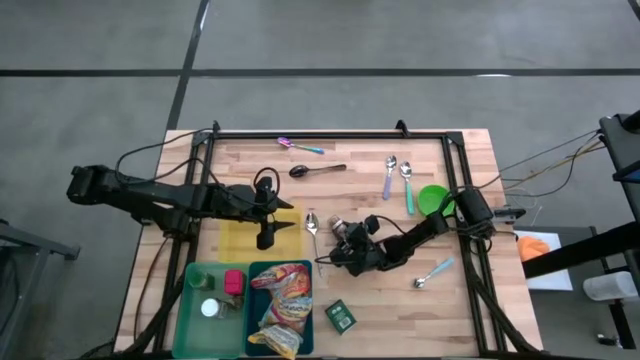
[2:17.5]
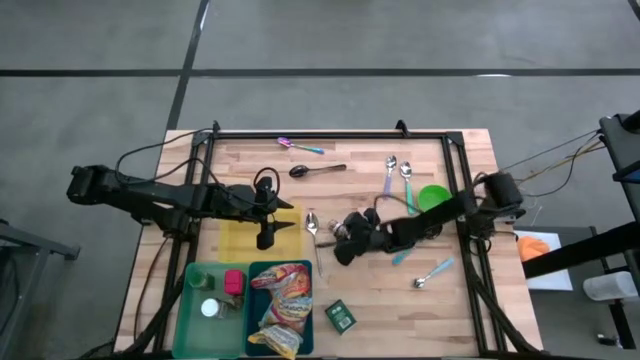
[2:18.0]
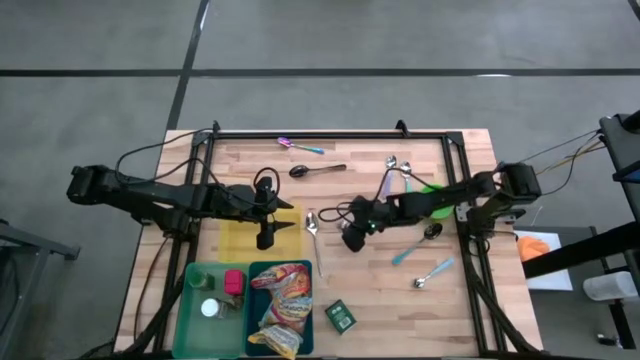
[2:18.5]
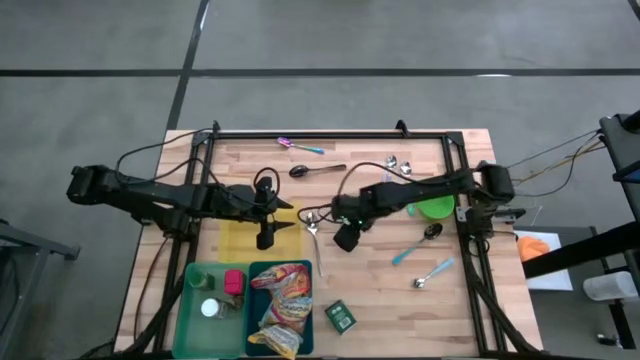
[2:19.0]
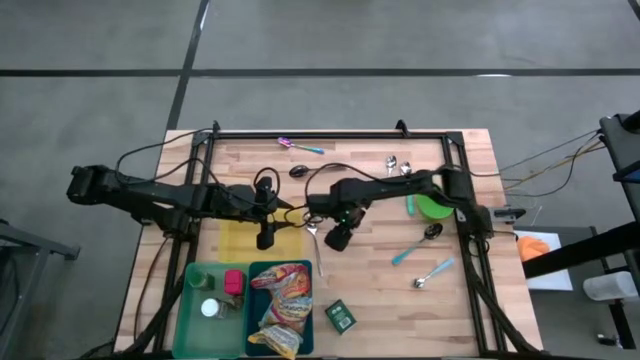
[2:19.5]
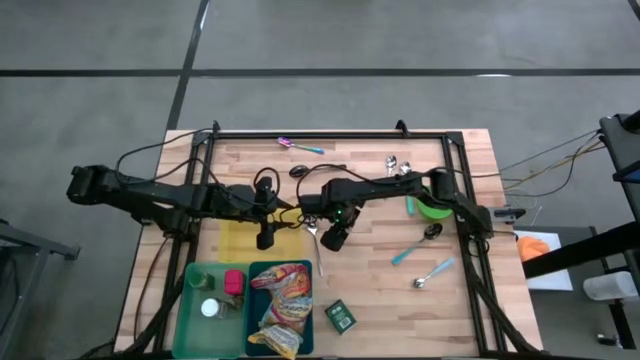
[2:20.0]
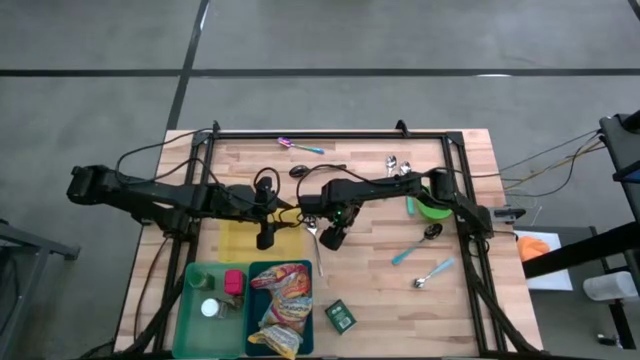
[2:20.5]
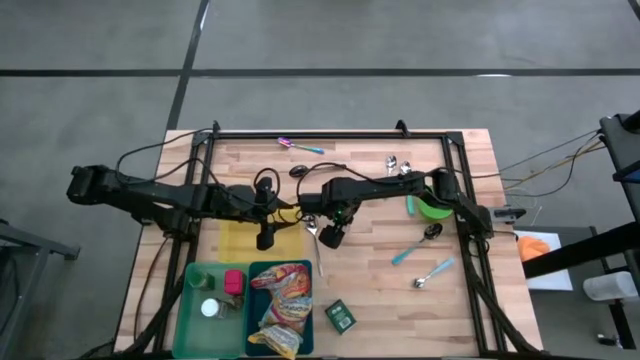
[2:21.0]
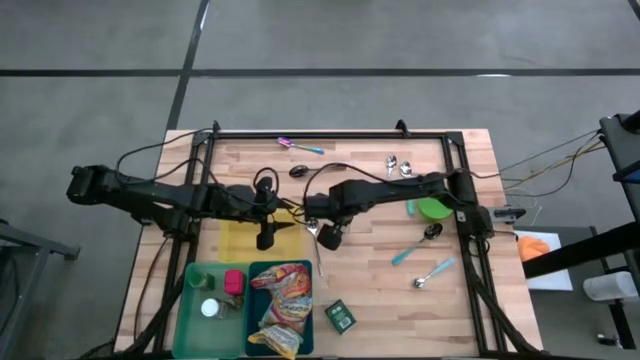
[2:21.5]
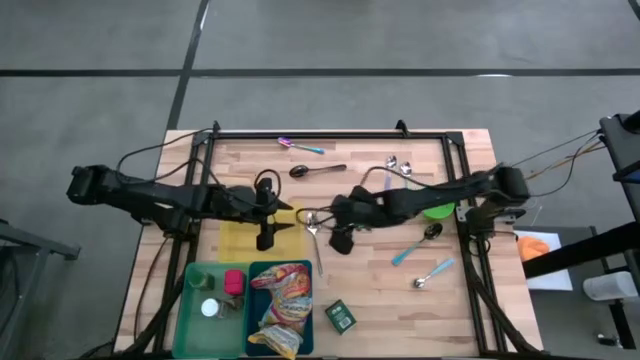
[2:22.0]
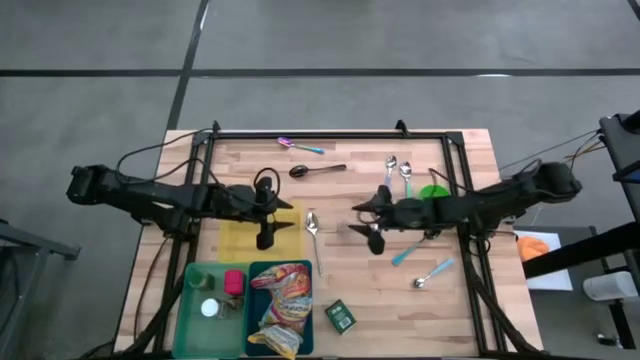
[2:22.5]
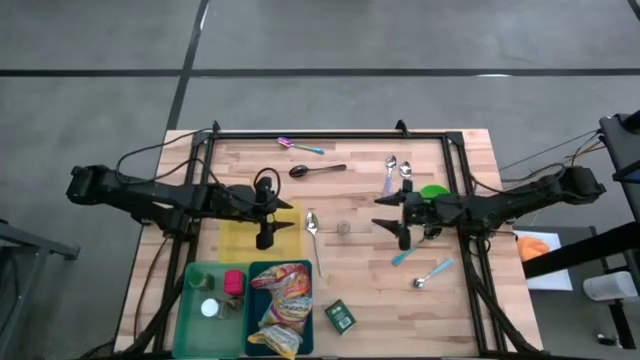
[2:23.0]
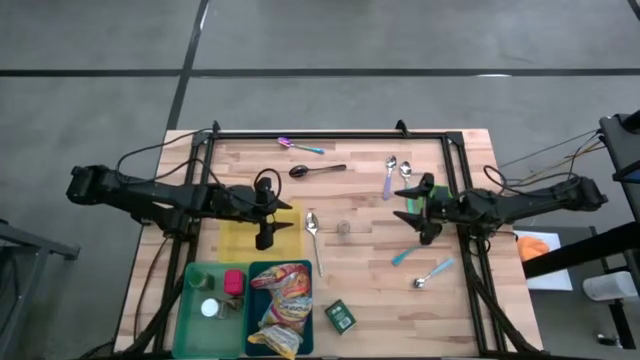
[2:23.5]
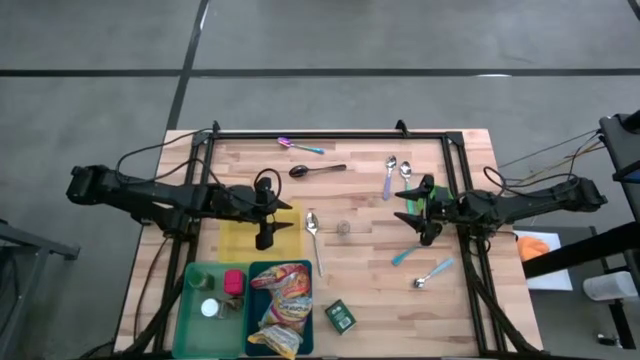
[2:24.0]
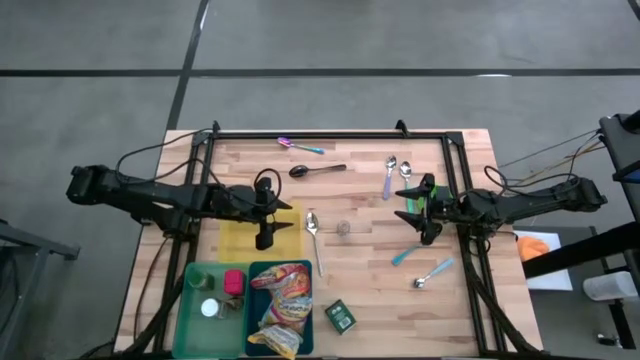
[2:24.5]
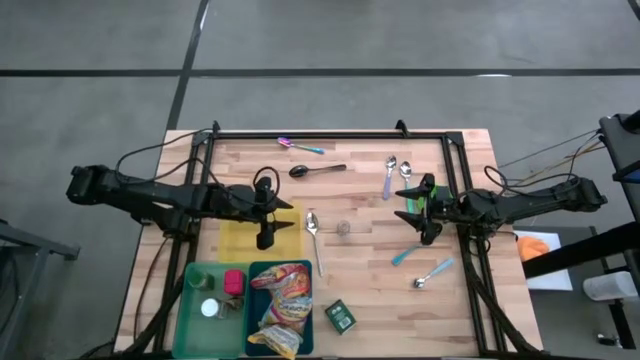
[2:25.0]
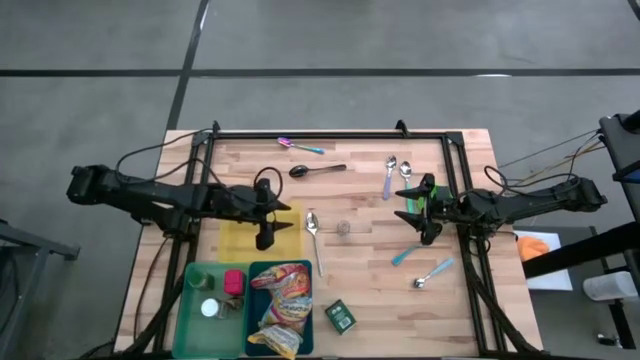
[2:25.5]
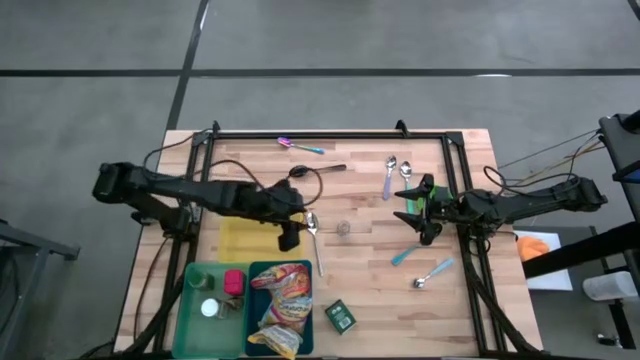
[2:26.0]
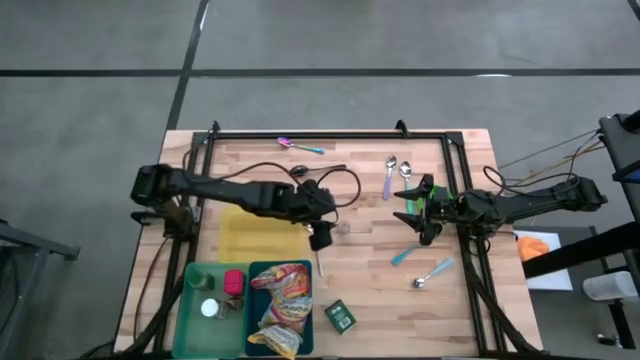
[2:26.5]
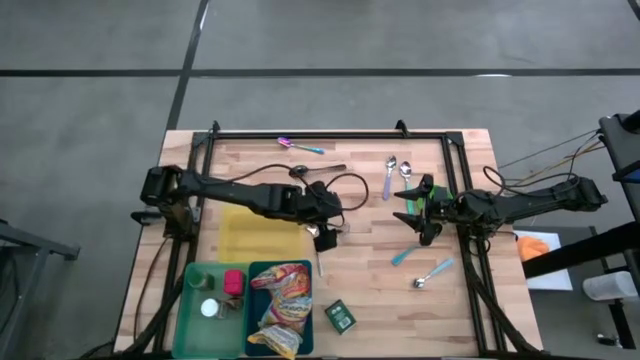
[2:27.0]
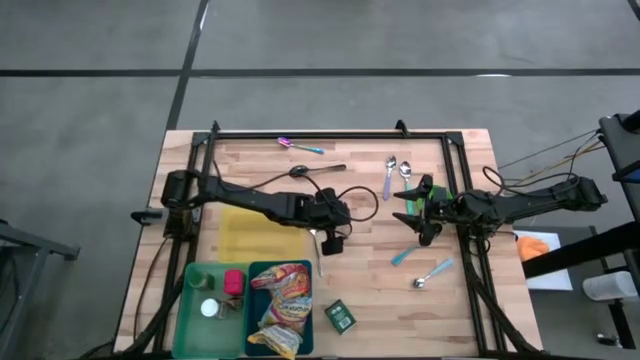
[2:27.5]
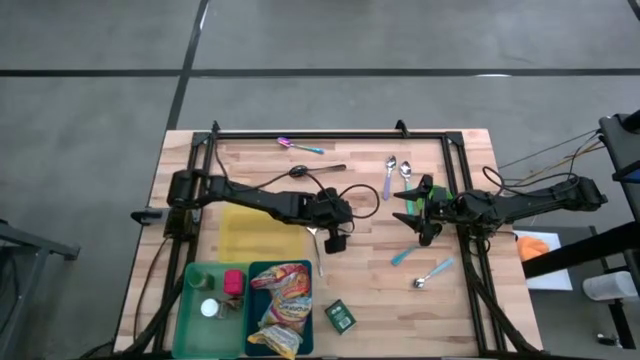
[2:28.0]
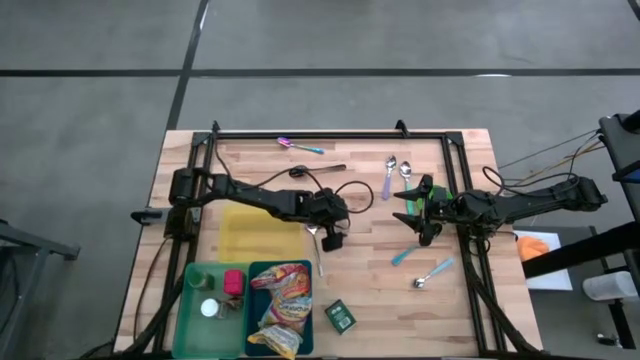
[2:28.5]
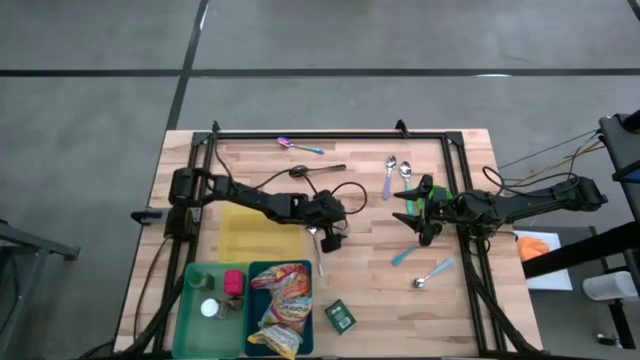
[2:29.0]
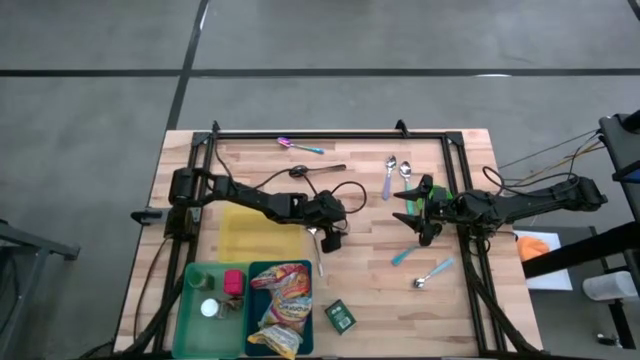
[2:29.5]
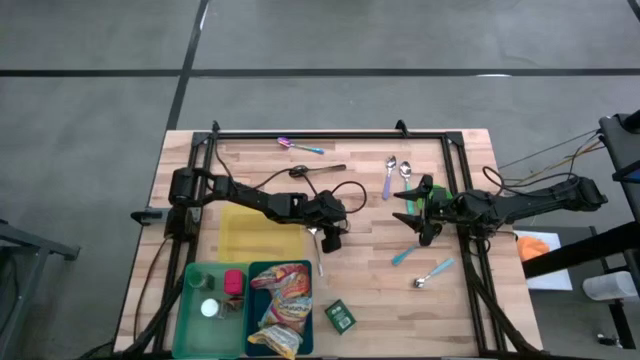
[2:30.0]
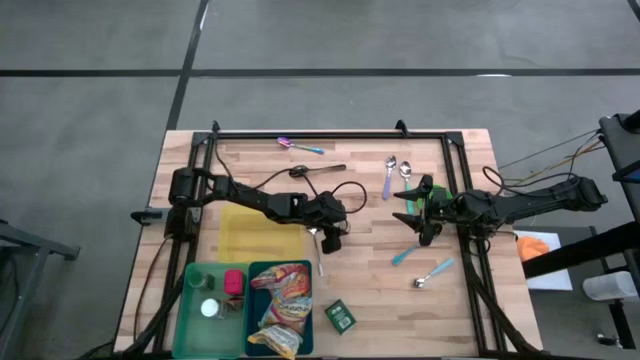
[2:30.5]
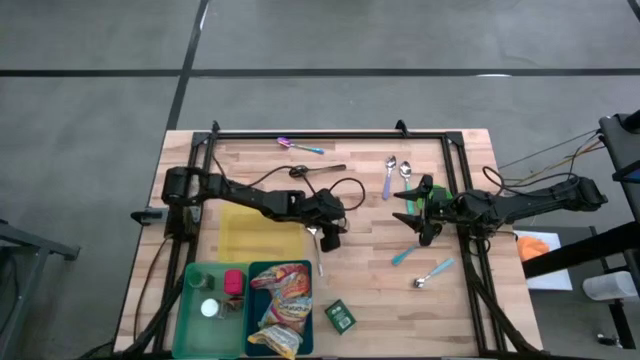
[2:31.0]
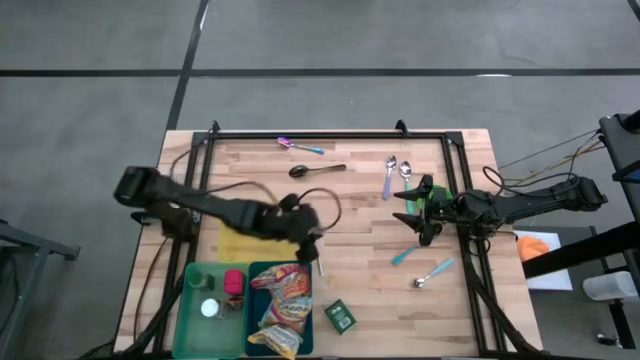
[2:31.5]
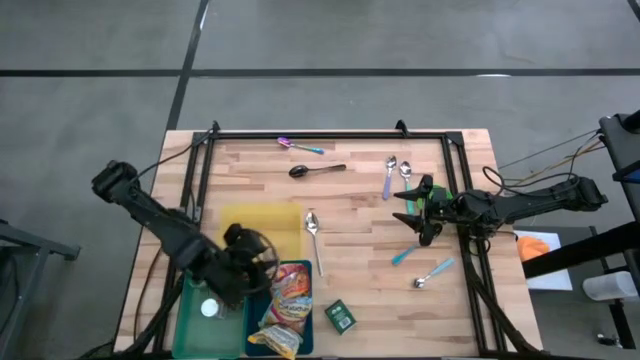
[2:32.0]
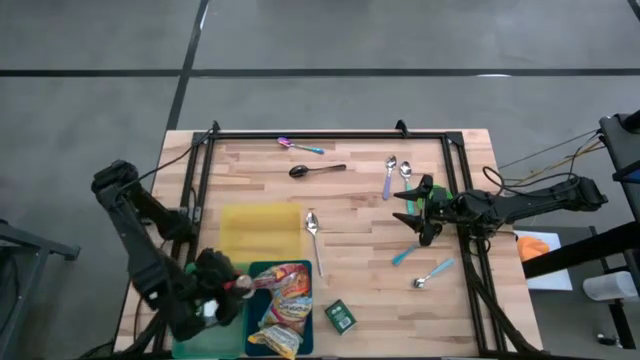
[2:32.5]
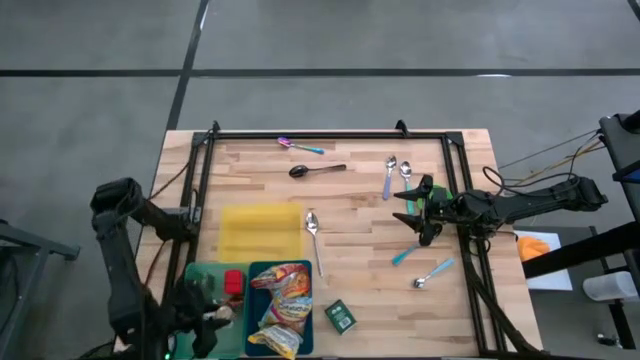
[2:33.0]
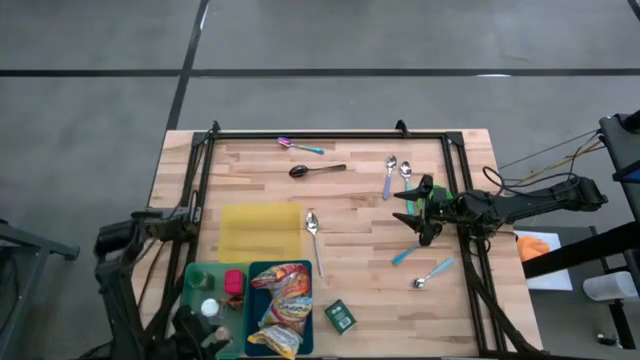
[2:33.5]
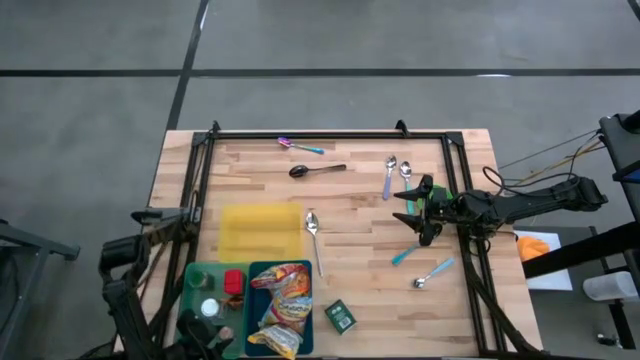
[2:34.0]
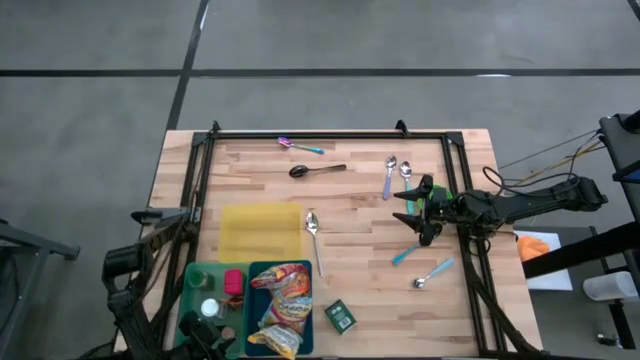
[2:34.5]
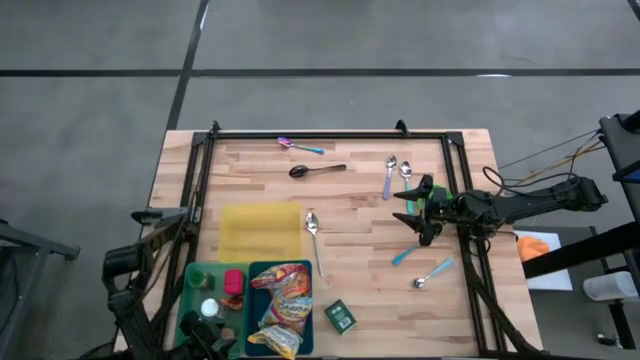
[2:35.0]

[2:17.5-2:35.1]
Put the brown spice bottle into the green bin
